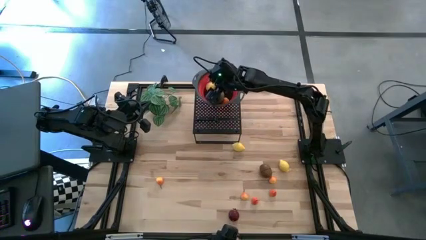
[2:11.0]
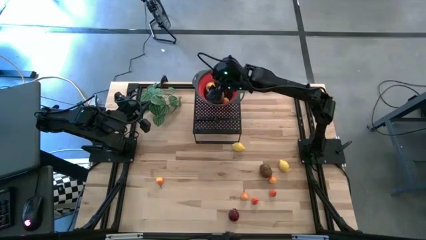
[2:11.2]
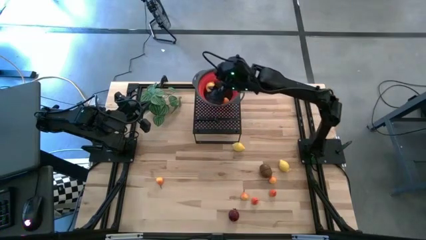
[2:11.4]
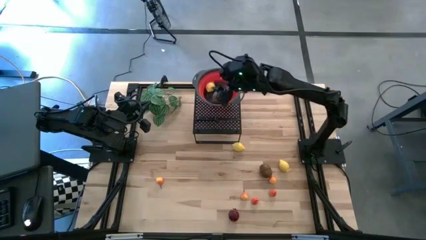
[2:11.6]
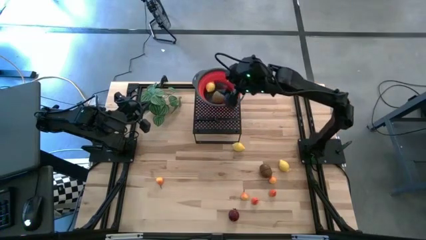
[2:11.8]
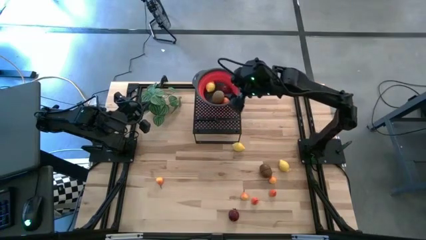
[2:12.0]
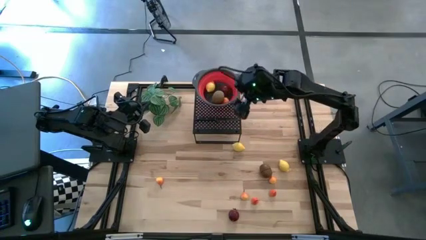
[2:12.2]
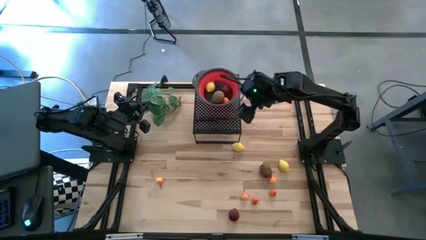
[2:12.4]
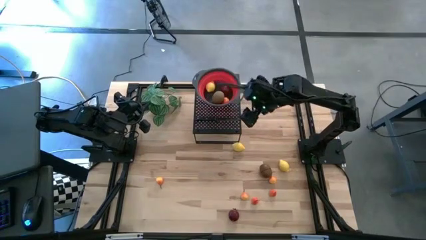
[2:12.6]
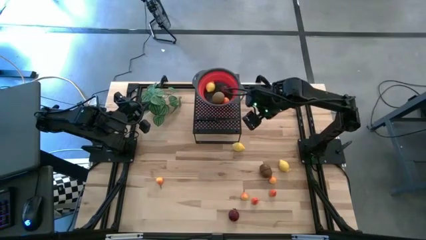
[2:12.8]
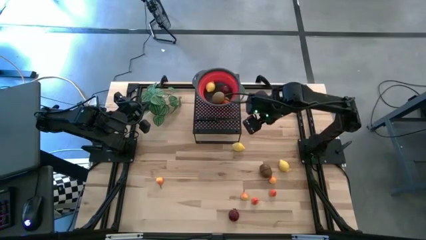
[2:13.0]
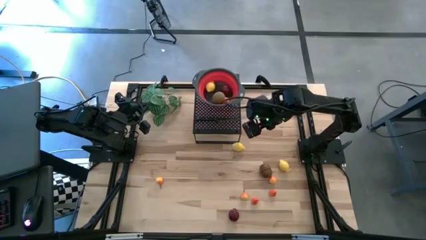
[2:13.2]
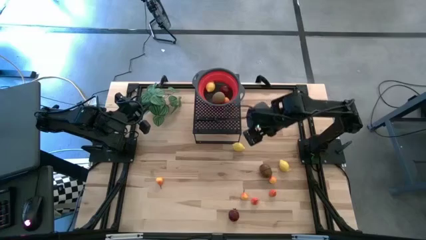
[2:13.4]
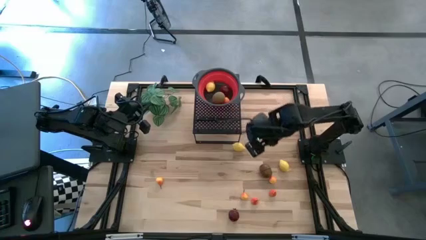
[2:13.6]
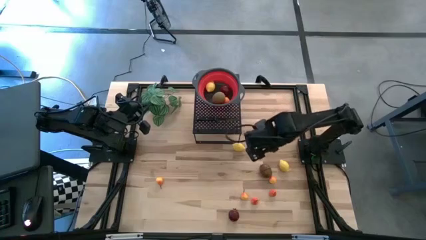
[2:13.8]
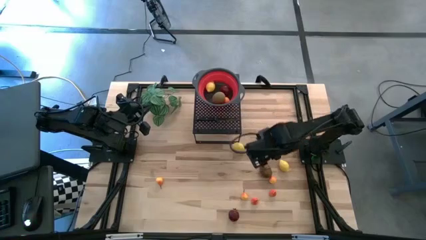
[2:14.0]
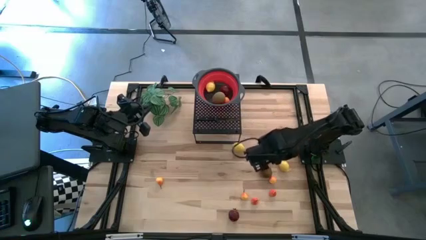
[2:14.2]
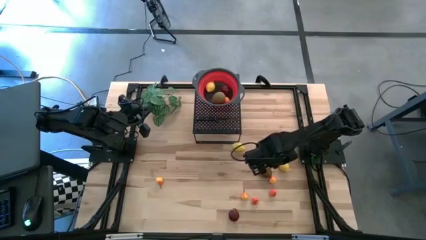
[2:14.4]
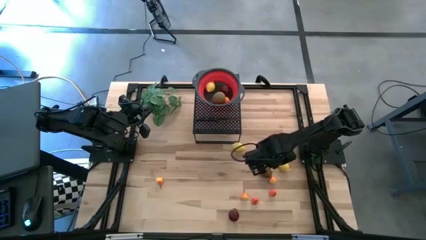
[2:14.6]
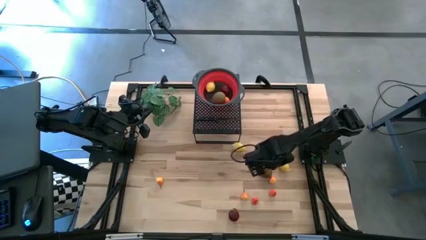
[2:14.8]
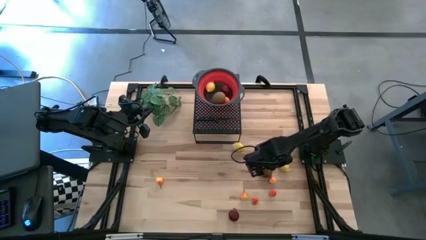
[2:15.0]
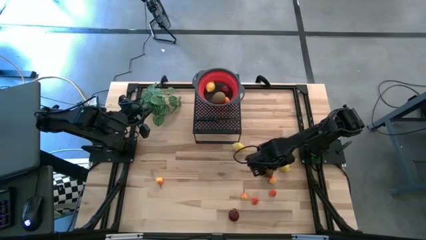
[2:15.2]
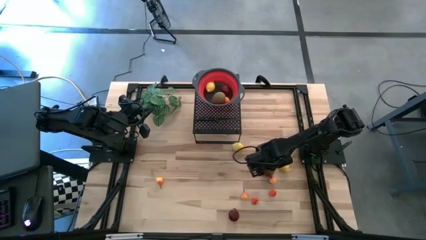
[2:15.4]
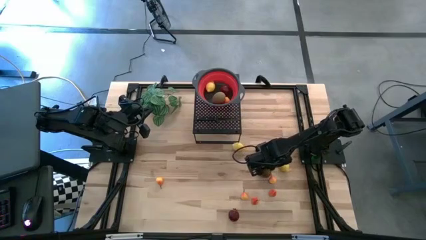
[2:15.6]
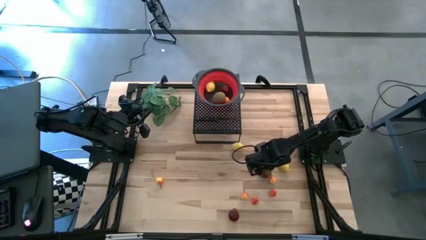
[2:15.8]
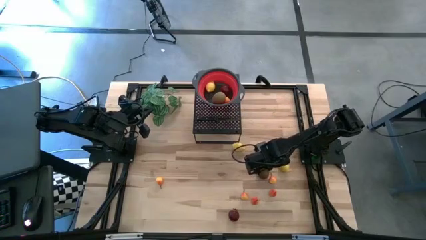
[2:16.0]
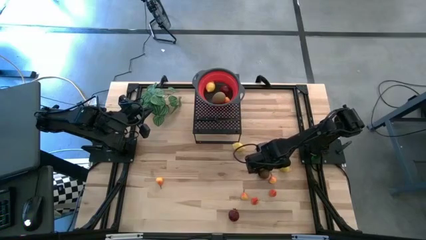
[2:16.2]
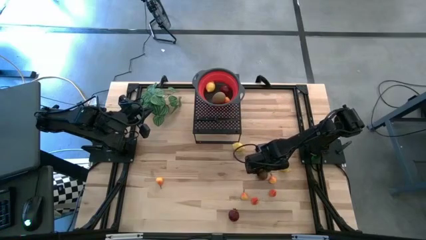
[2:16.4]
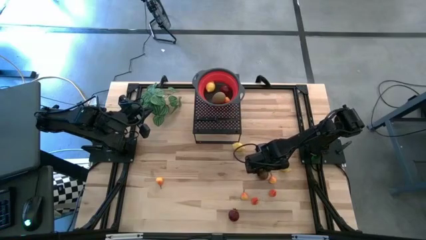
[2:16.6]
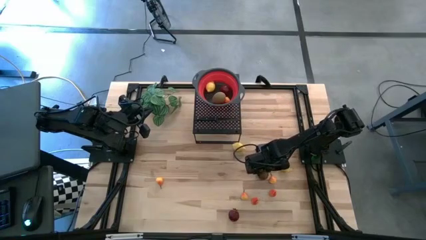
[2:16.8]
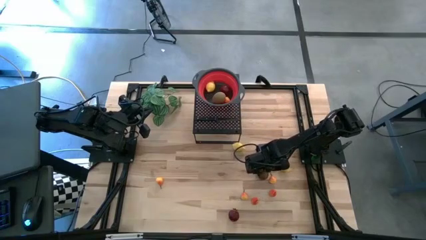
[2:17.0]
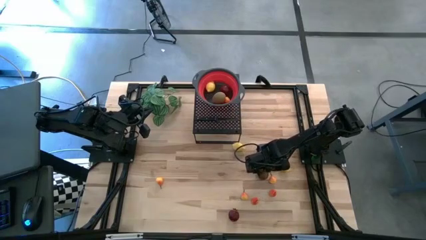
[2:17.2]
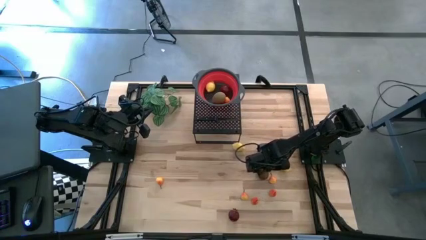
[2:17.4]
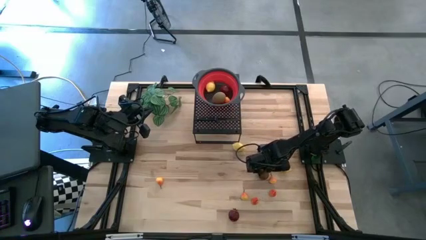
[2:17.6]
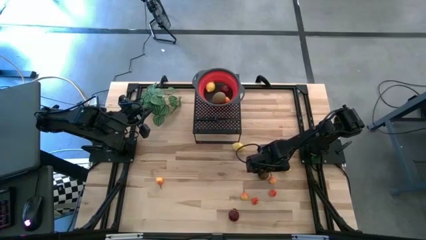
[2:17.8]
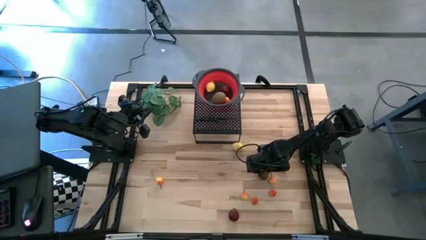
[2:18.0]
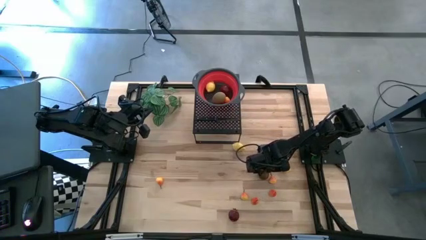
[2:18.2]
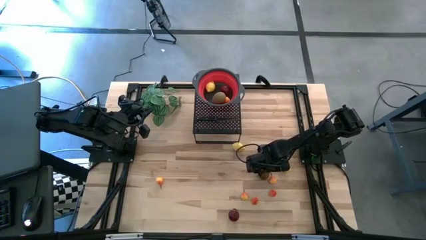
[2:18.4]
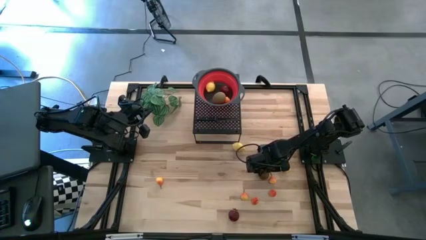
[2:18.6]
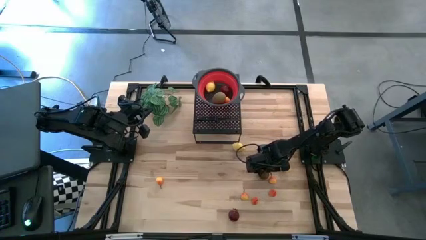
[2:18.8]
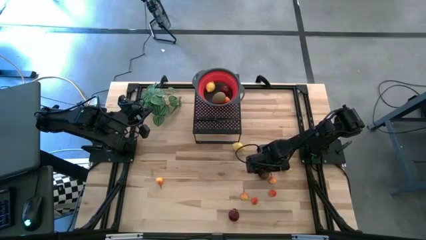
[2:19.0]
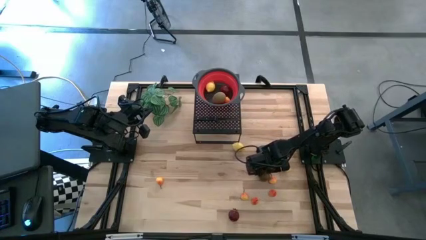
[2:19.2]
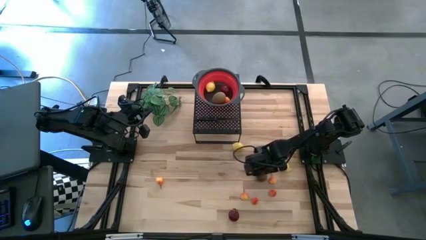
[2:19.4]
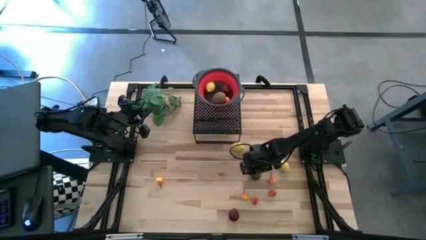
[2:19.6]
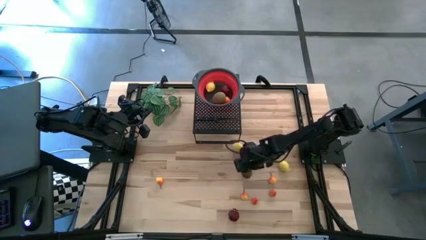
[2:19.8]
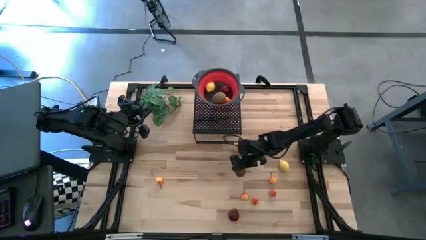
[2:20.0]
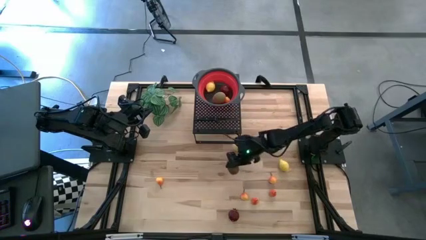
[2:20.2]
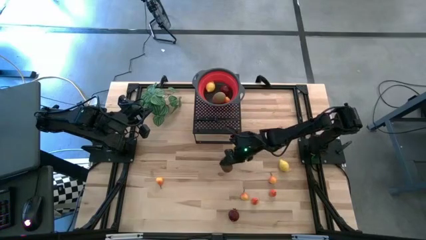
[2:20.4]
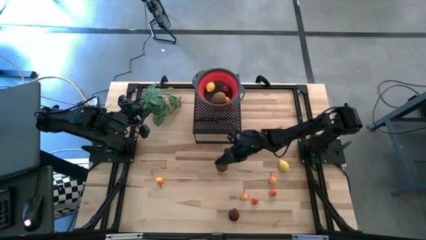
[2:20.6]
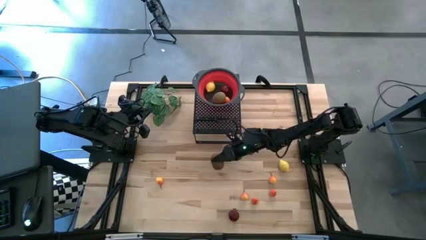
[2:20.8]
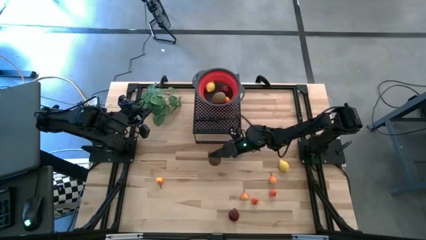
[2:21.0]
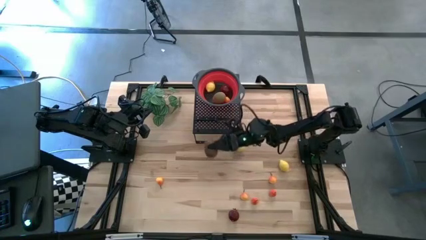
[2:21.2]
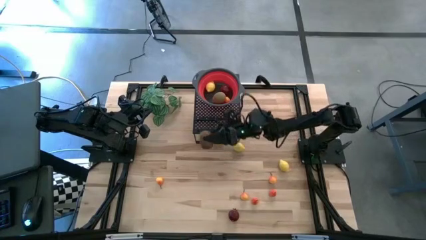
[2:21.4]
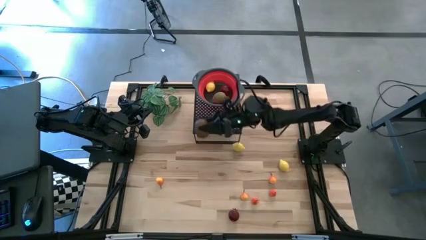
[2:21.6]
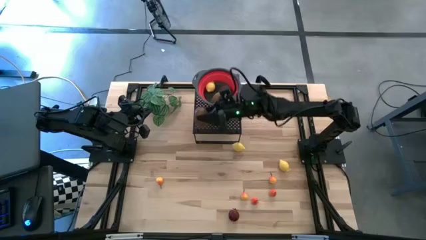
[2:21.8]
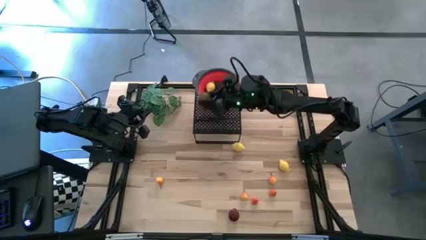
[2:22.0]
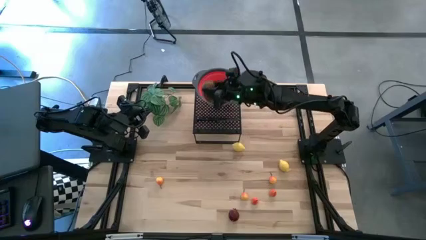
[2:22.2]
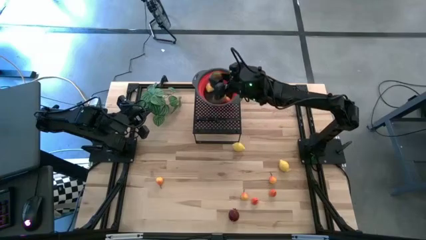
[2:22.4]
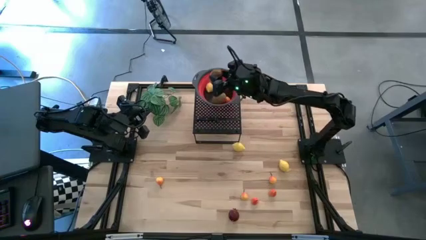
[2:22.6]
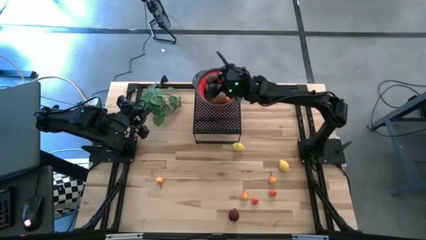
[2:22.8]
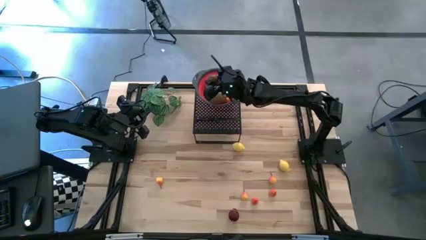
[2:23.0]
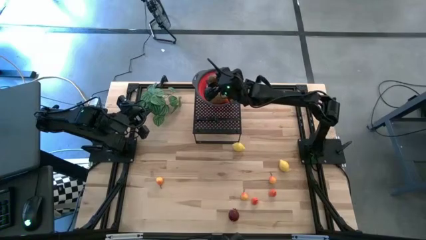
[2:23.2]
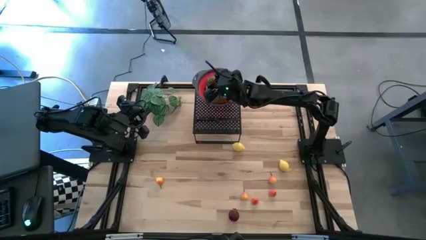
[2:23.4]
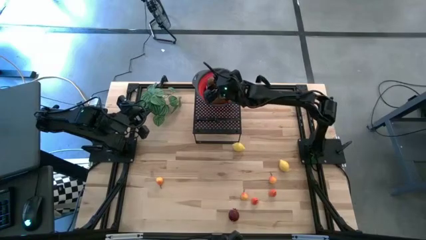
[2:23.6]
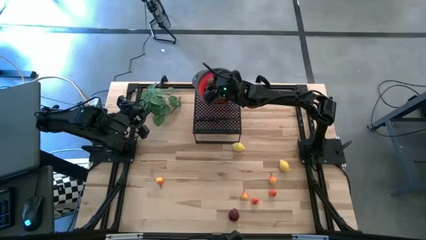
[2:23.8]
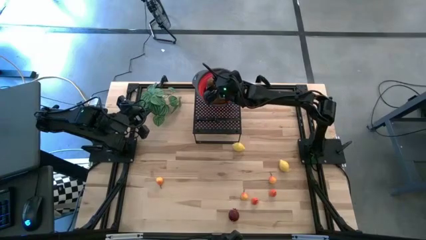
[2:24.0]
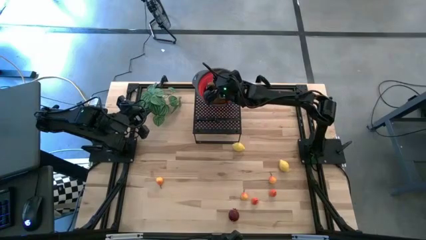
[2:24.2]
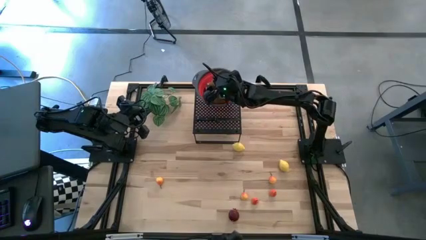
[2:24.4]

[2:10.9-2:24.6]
Task: Pick & Place Fruit
Put the kiwi into the red strainer bowl
